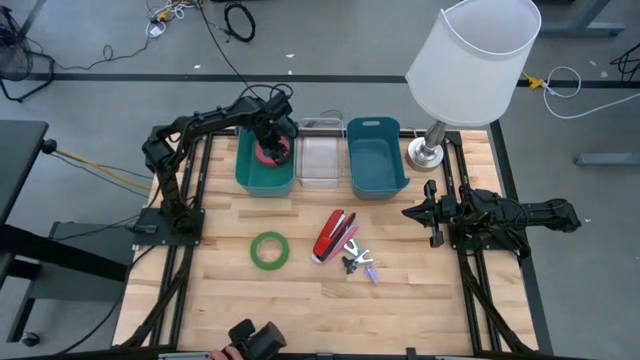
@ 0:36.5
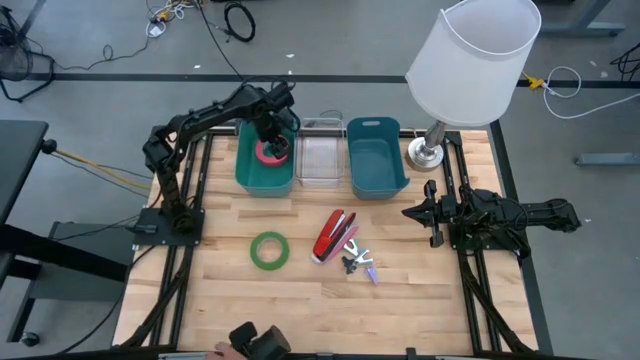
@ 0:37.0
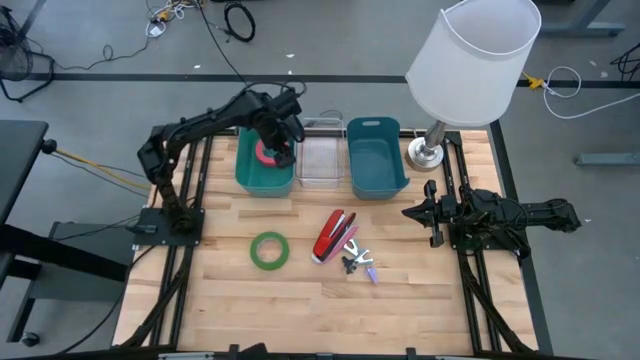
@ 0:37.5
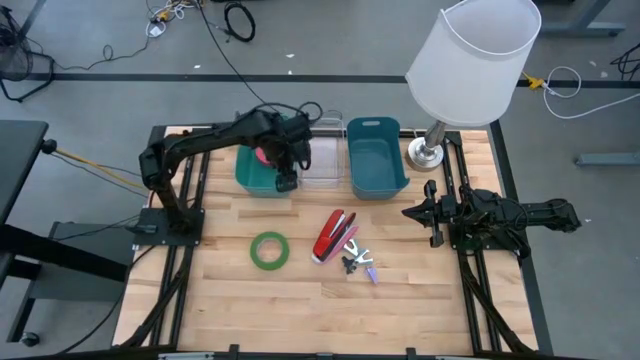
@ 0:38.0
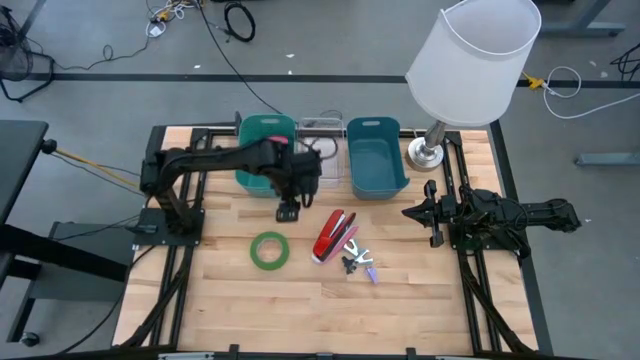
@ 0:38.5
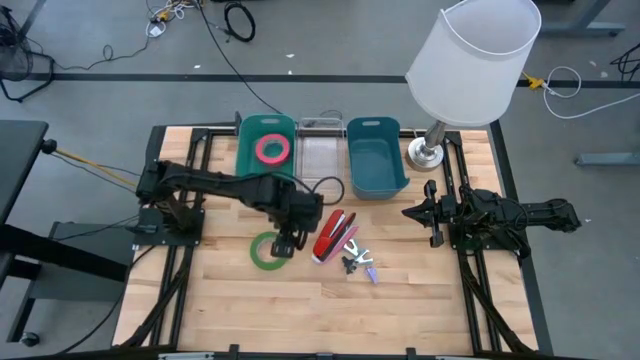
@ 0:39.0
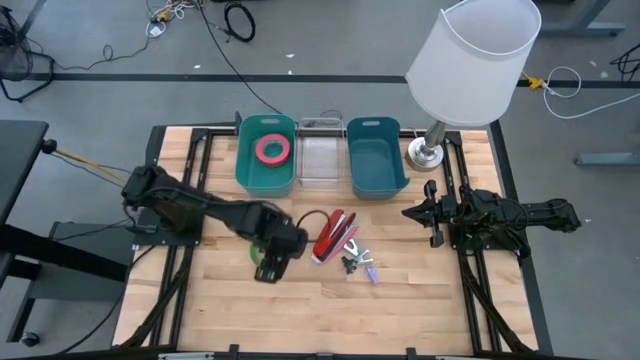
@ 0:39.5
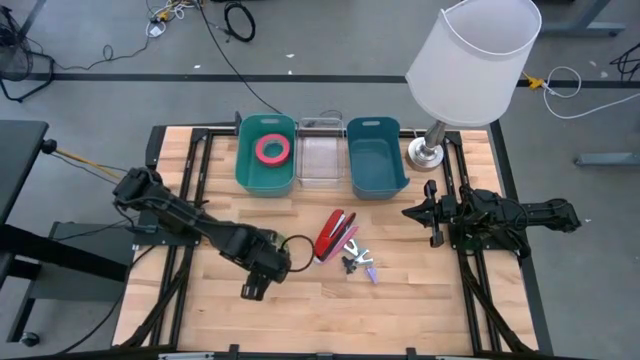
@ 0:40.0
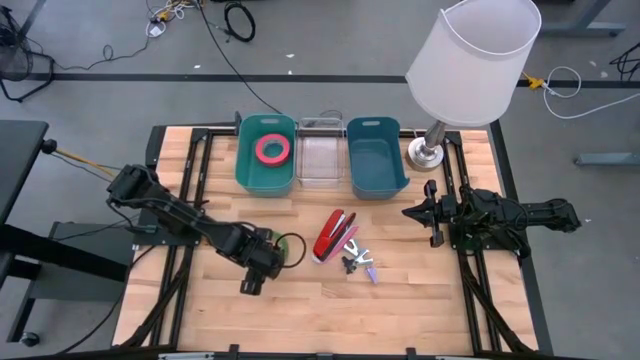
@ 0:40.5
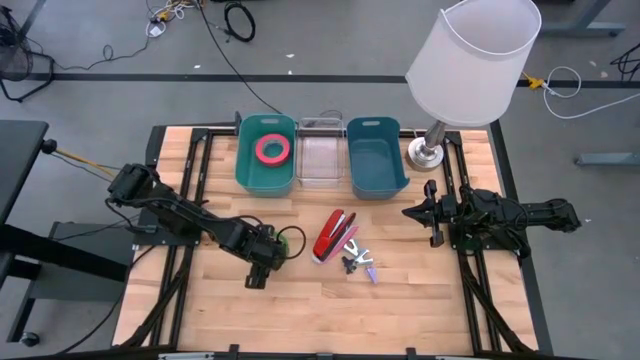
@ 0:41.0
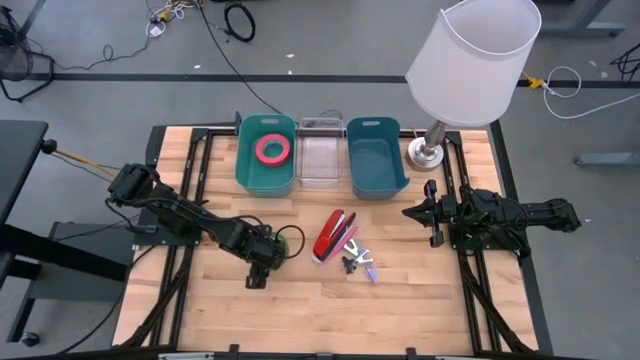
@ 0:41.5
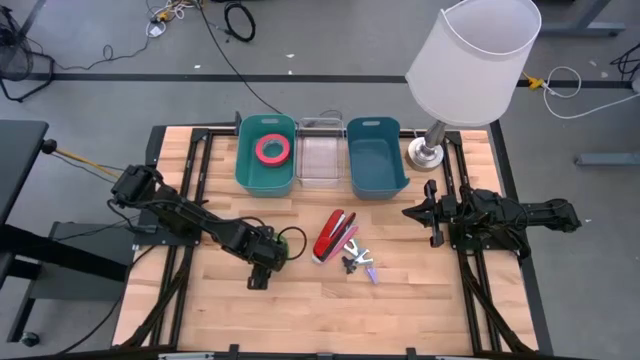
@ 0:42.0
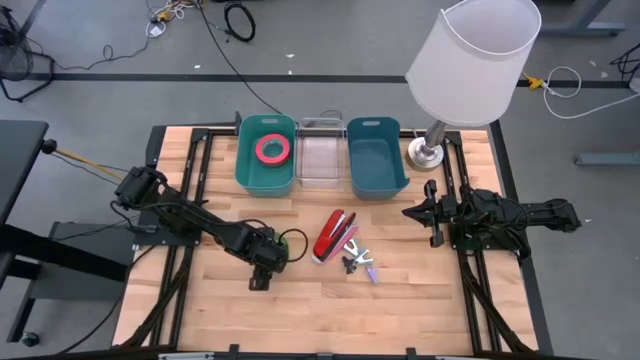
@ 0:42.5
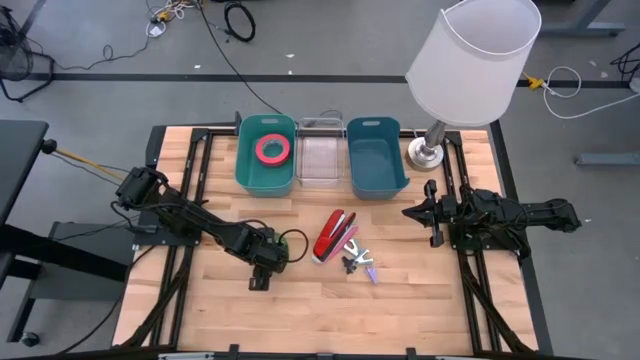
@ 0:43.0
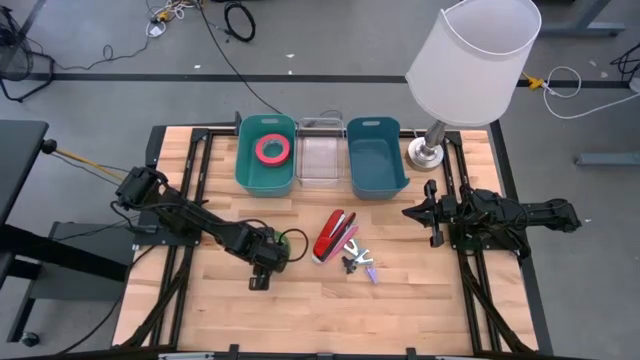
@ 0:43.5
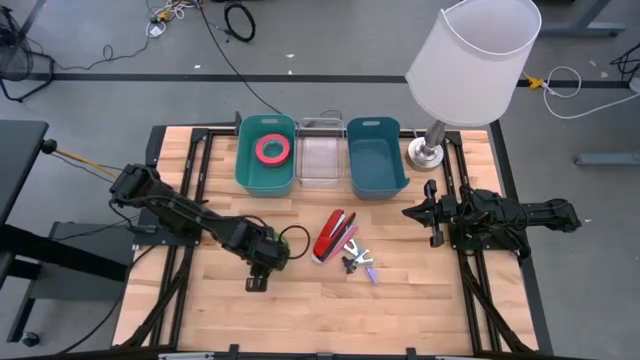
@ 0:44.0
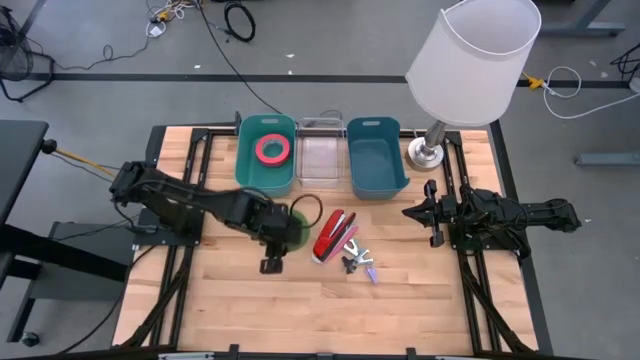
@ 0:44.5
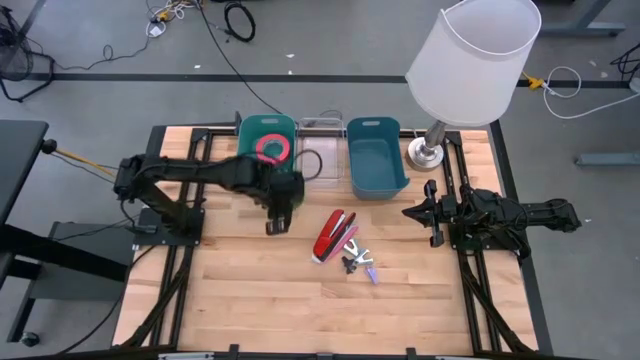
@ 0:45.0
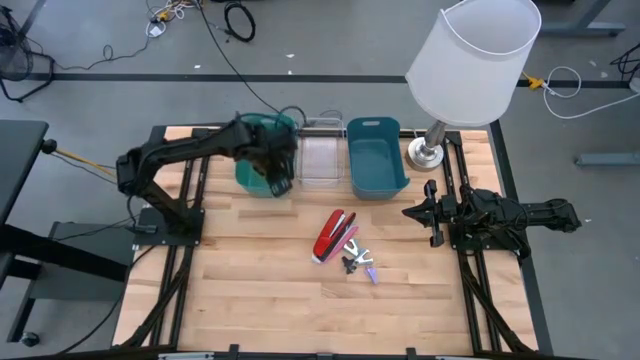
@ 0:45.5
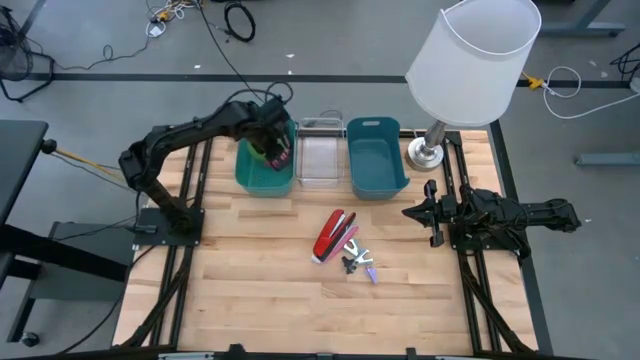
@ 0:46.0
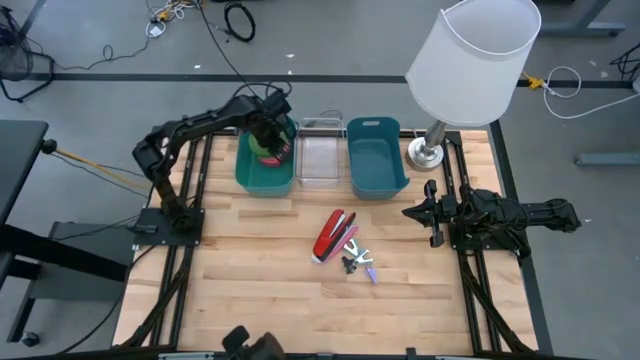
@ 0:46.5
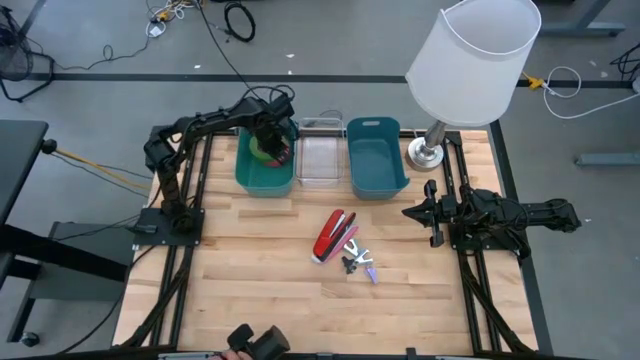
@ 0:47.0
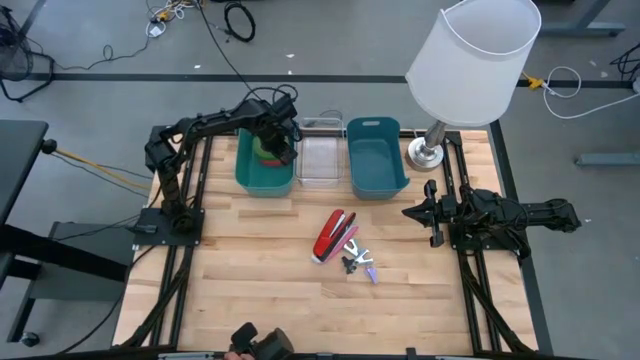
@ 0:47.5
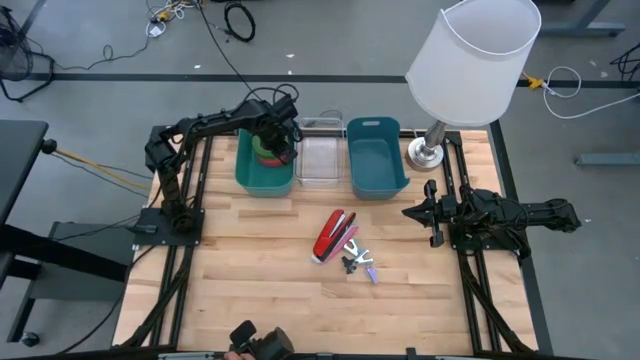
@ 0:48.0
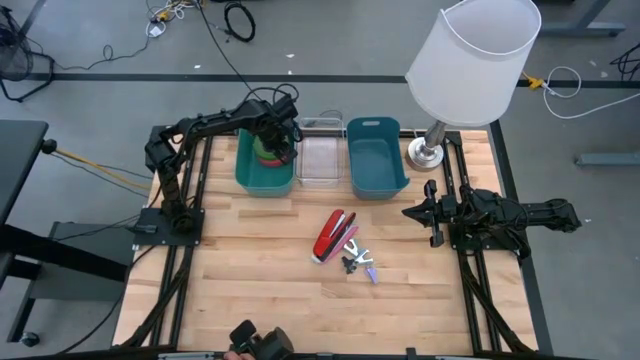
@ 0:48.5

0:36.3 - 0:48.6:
Task: Pick and place Stapler, Stapler remover, tape
Put the green tape into the green bin

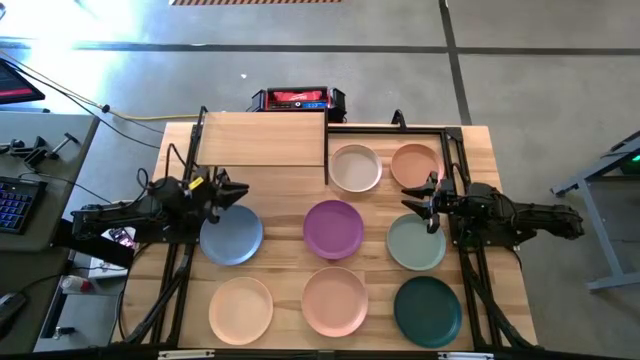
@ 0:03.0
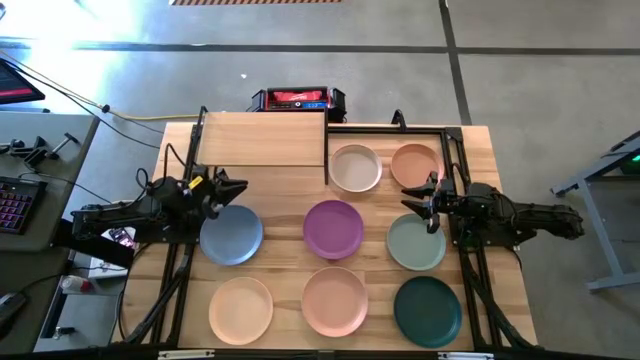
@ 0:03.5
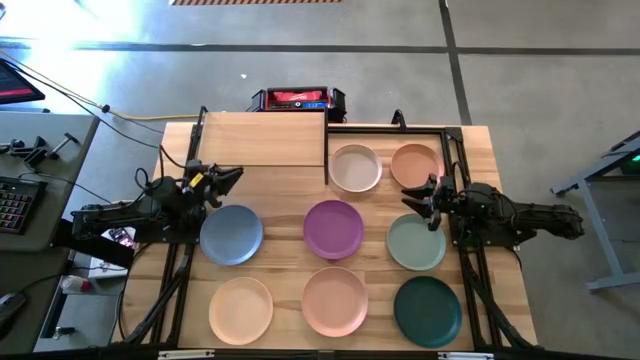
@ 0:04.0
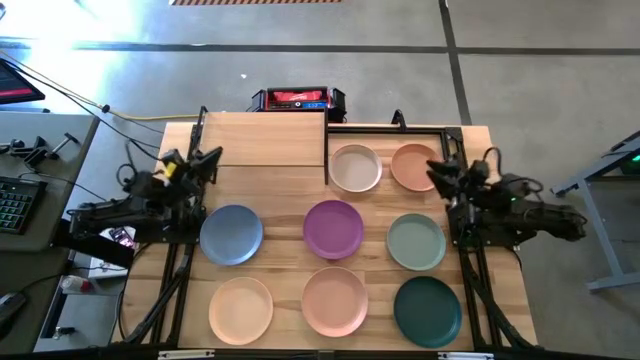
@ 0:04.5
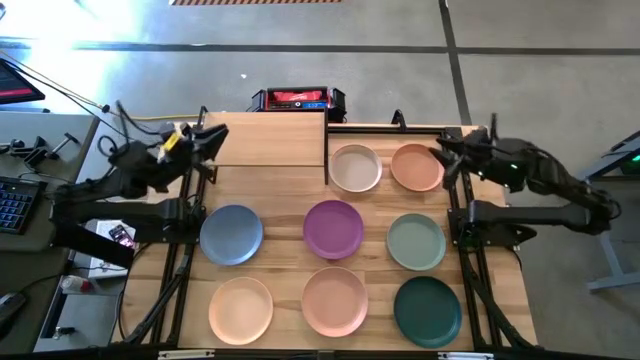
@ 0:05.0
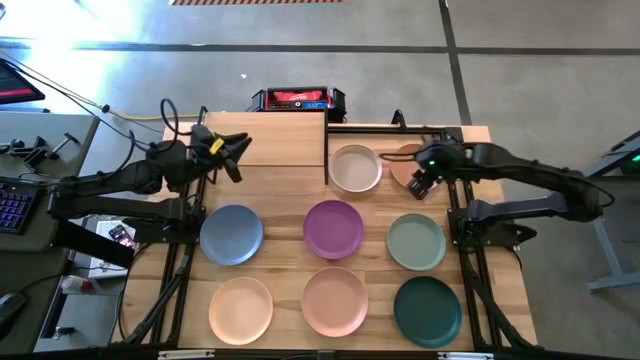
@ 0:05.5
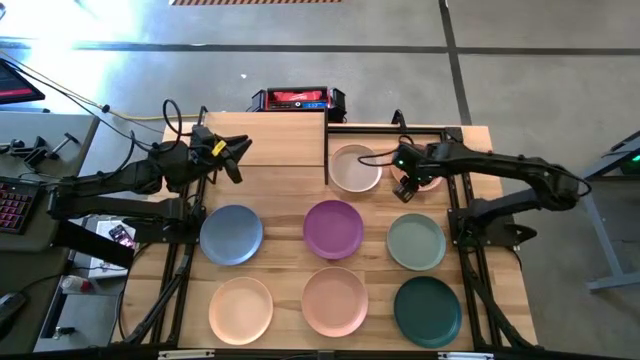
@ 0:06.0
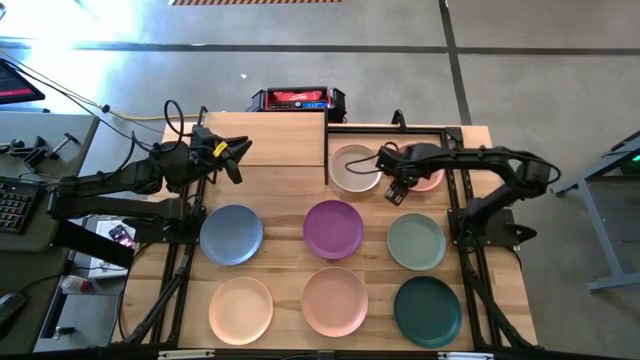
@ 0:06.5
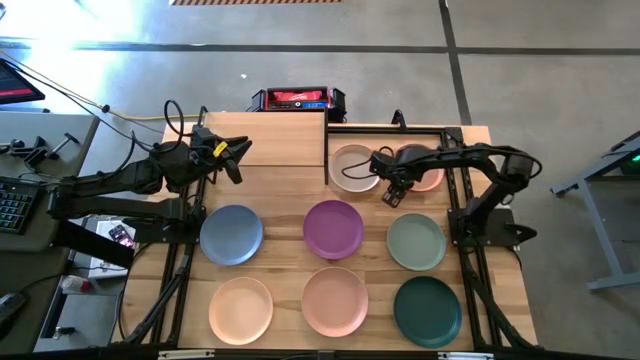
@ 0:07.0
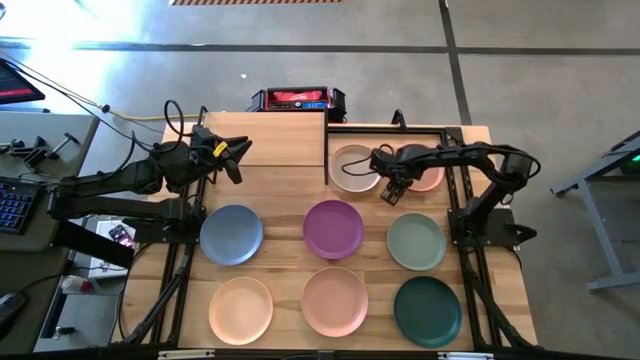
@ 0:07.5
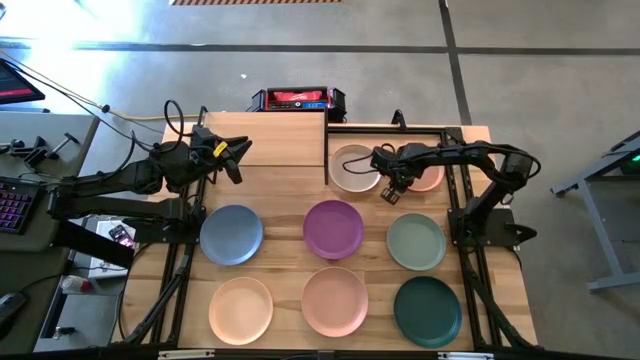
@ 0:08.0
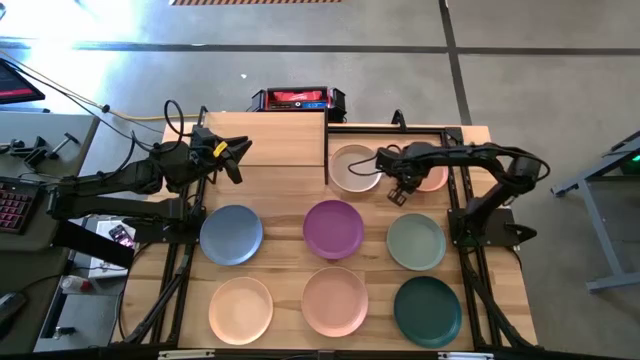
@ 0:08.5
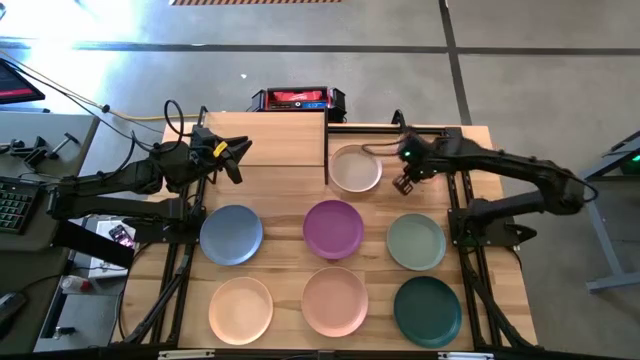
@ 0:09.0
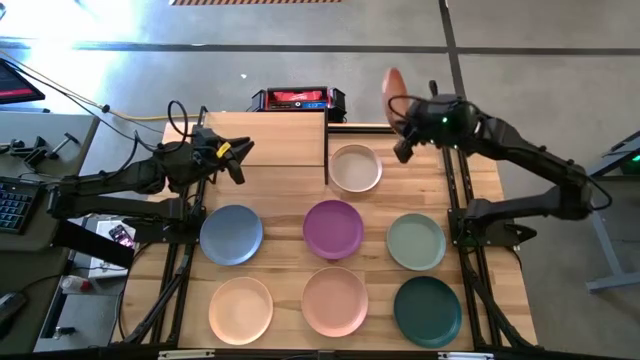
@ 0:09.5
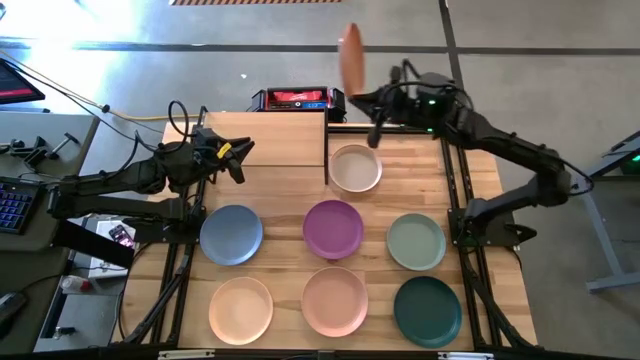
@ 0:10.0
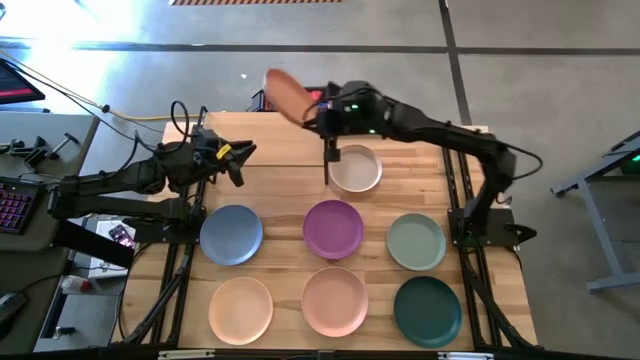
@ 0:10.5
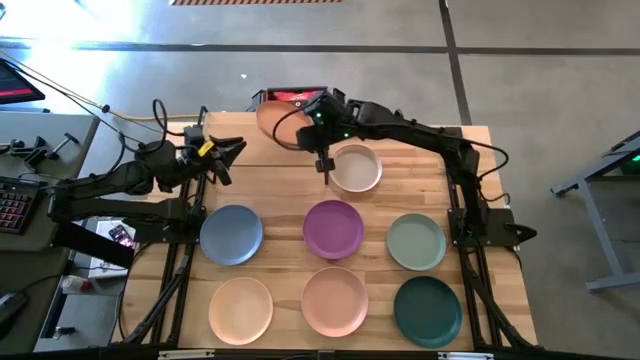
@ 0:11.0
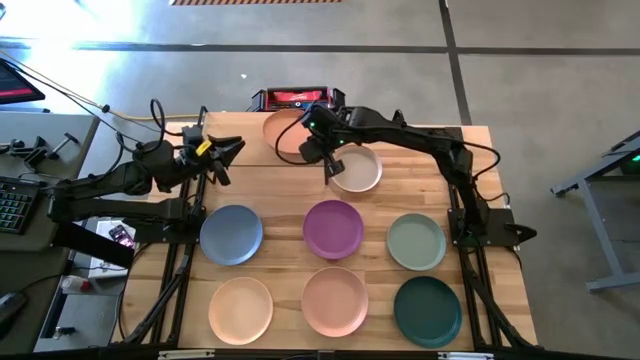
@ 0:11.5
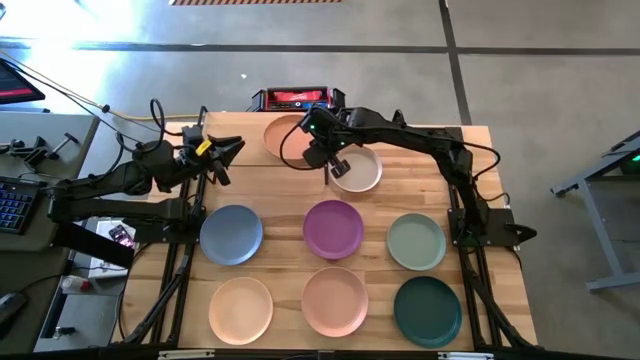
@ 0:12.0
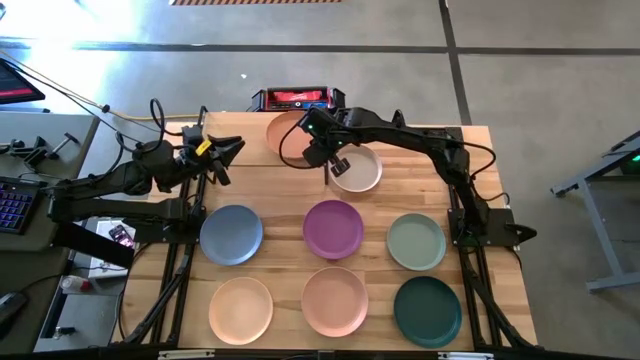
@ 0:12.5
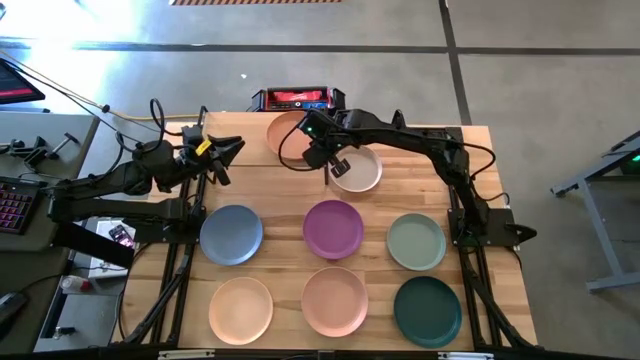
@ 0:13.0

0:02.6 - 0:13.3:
Task: Place and stack plates onto a shelf
Put the top orange plate on the shelf
